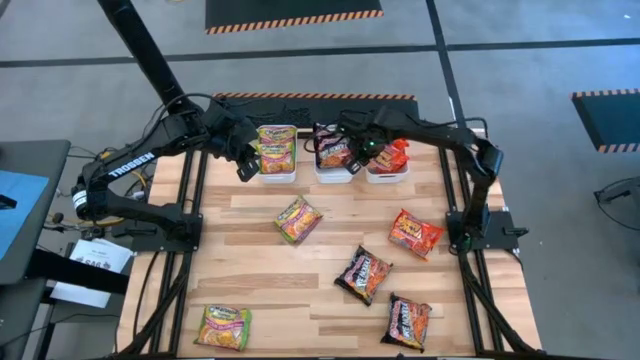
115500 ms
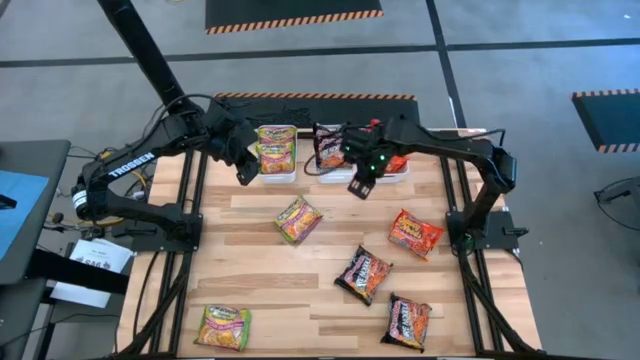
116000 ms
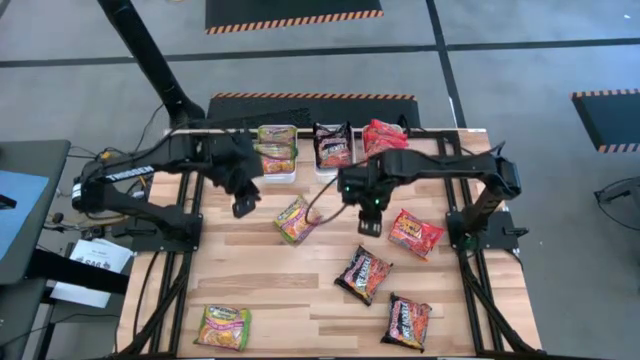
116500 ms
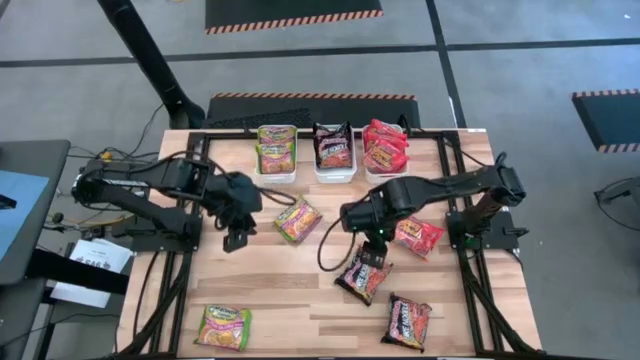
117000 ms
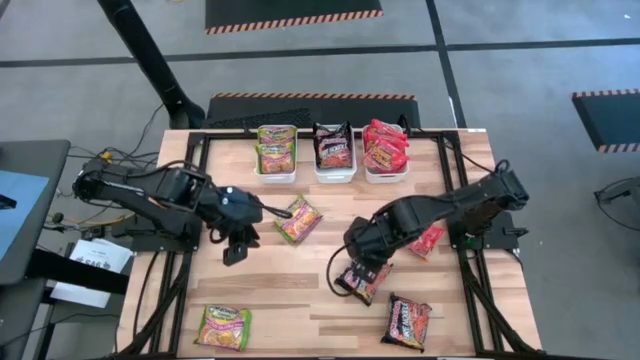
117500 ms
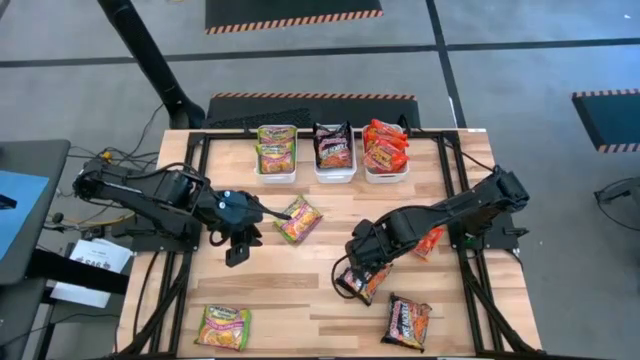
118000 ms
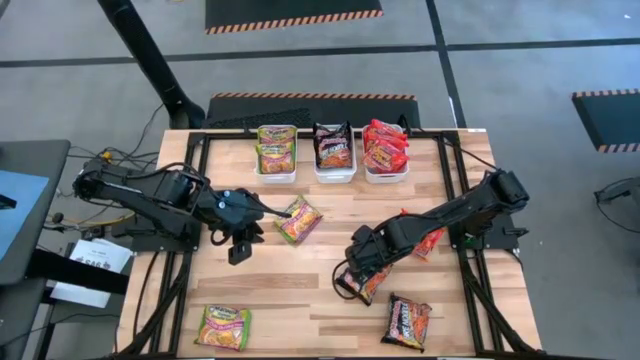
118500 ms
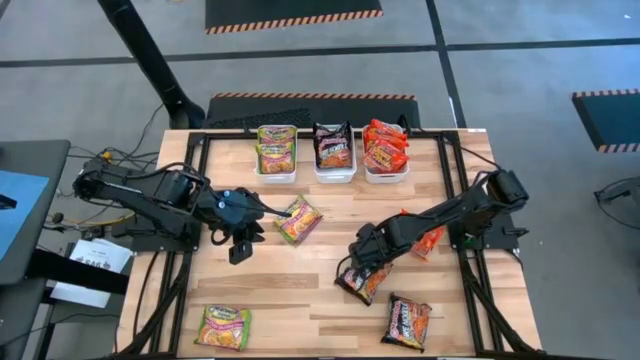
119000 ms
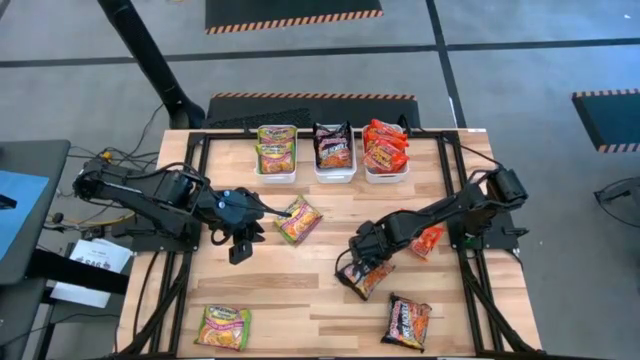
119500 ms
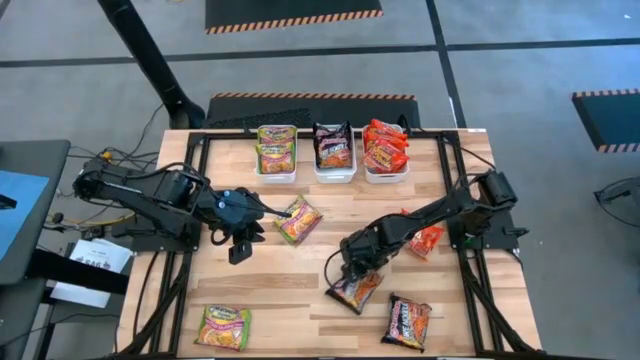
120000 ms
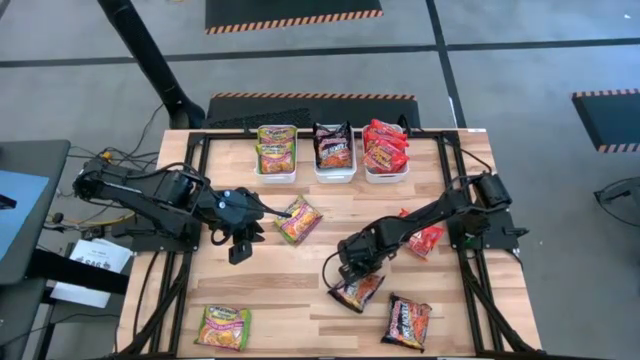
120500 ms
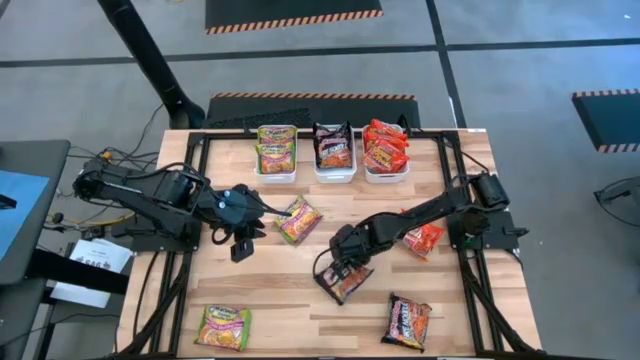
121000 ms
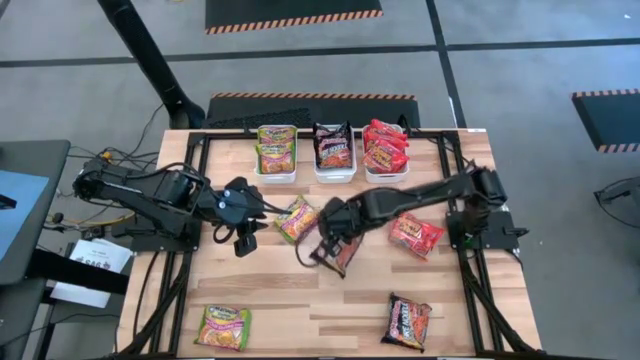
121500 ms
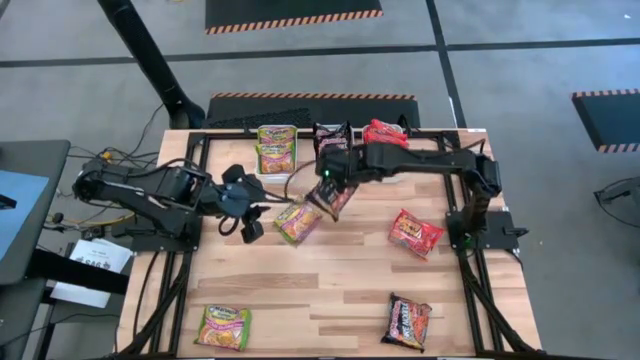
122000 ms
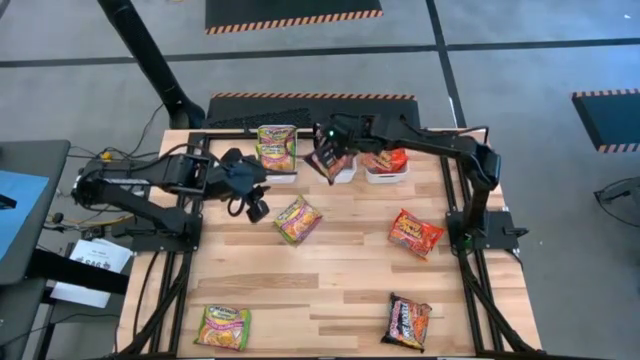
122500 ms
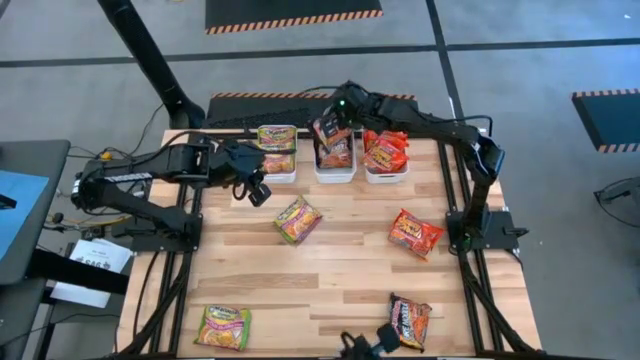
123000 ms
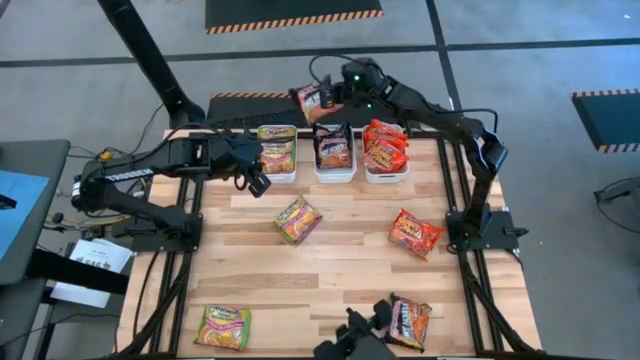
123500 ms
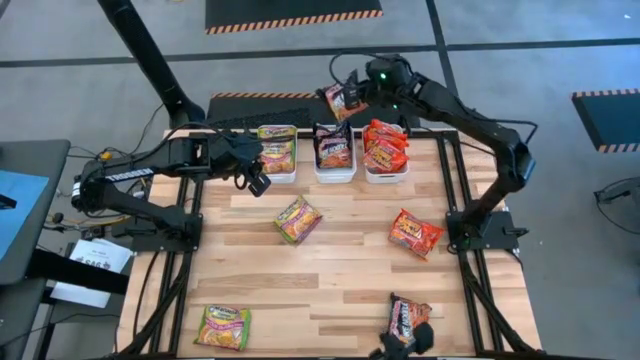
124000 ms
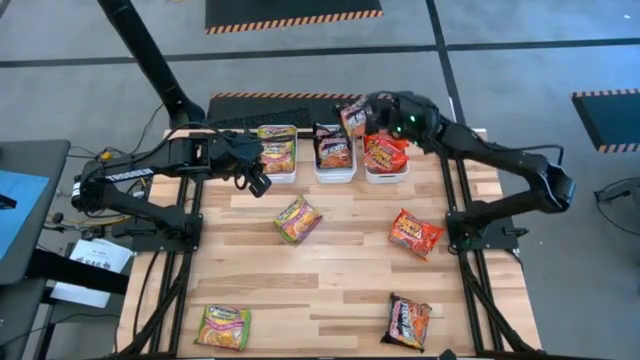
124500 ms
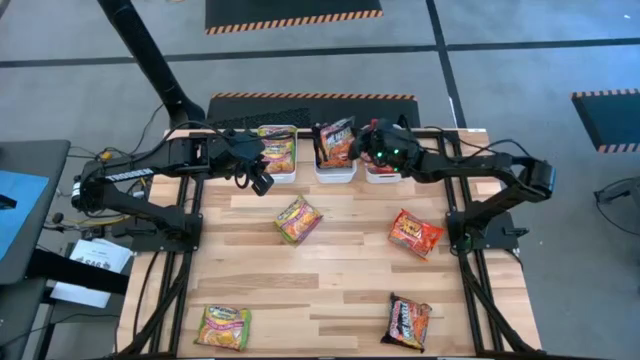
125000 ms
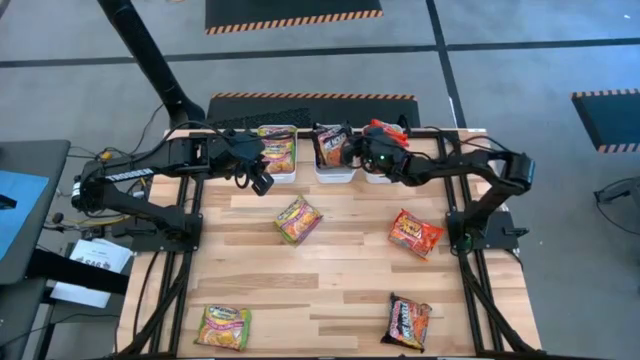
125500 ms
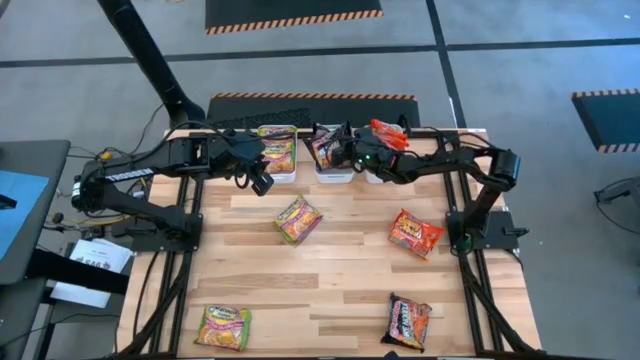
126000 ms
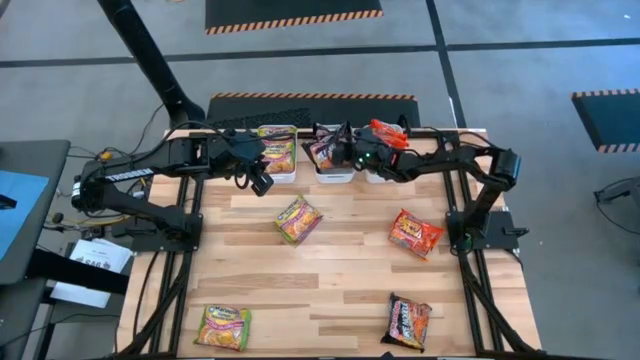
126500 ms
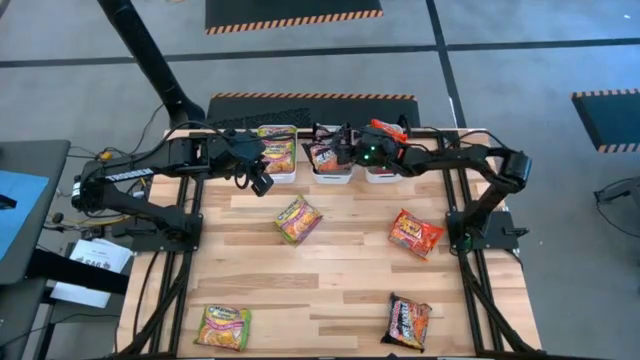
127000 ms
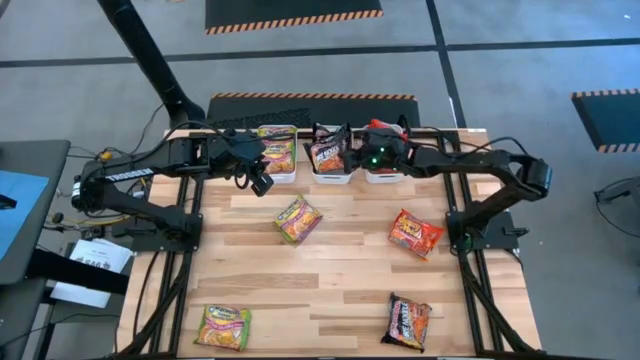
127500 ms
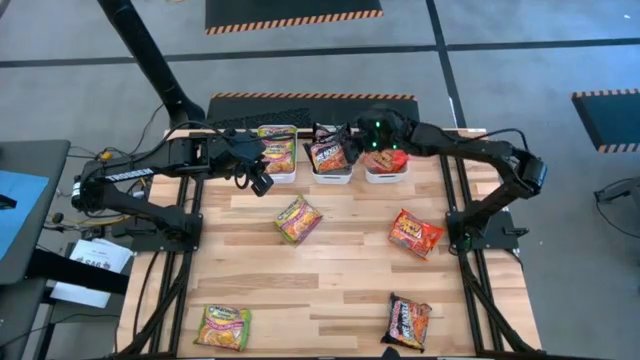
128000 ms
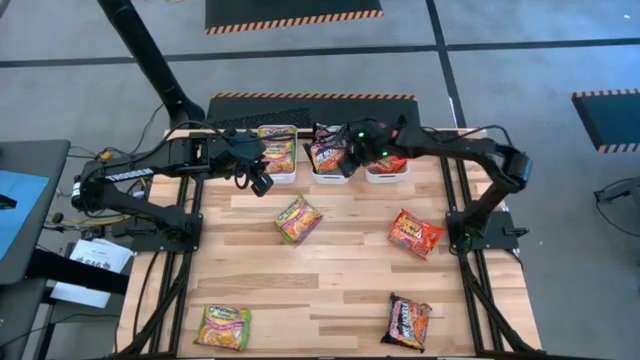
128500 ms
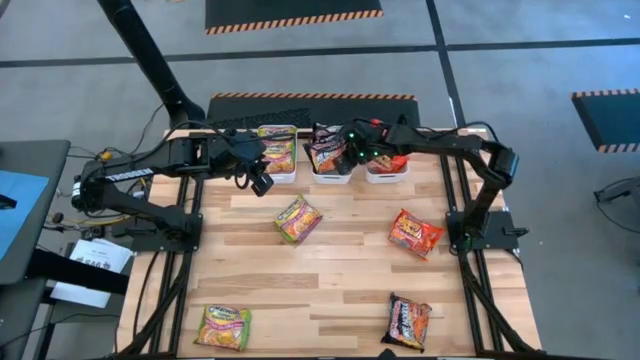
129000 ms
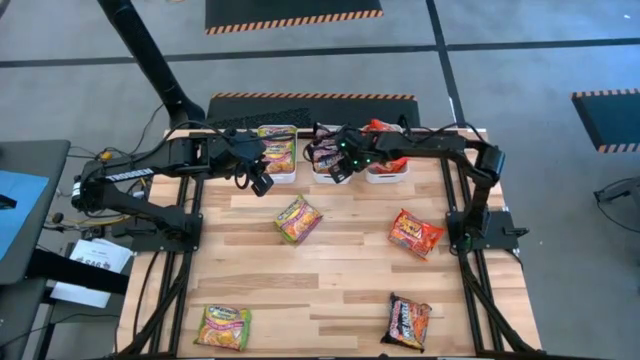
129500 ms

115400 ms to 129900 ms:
Task: Sort Maruchan noodles
Put the black noodle pack into the middle white bin

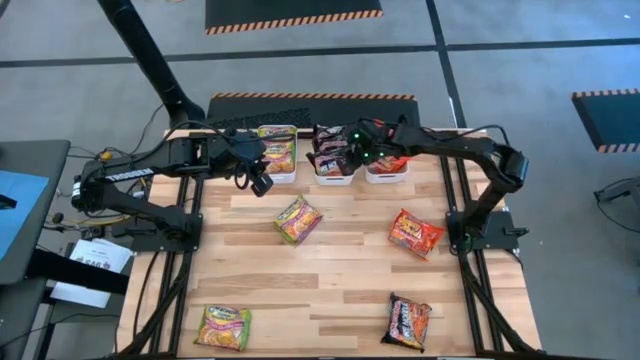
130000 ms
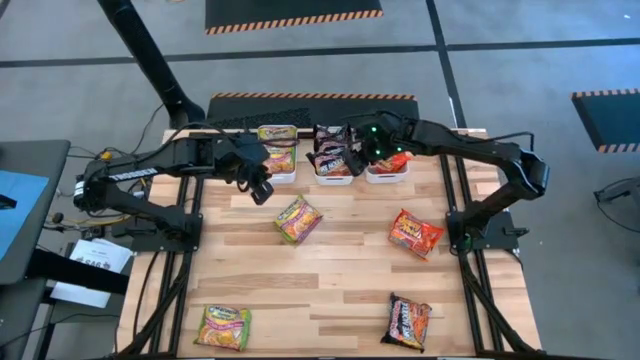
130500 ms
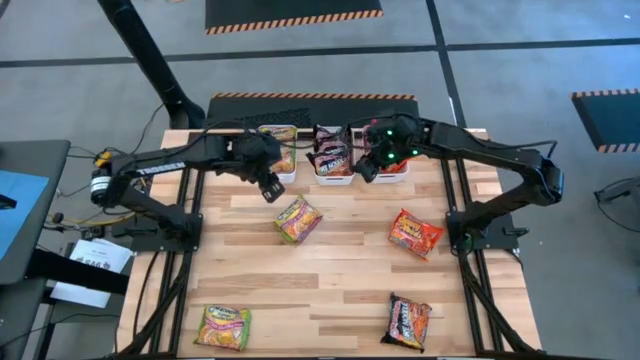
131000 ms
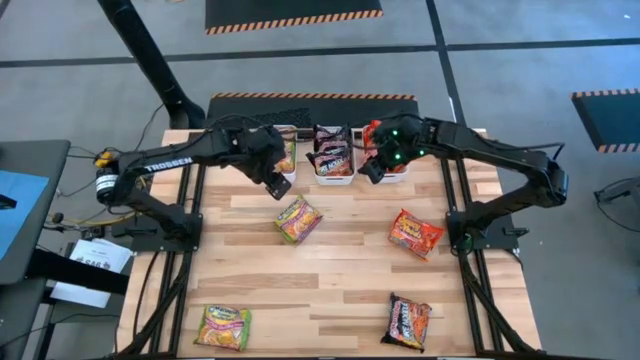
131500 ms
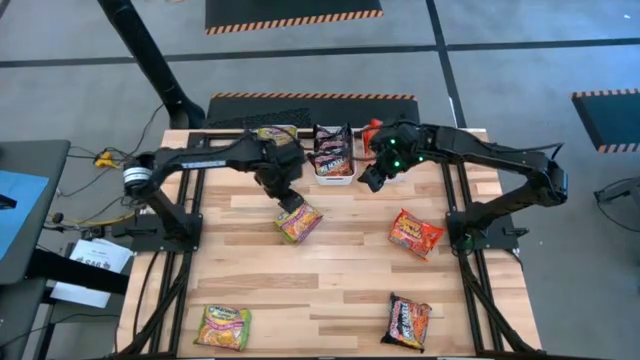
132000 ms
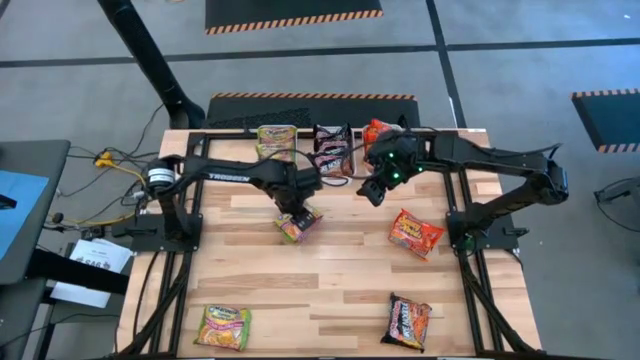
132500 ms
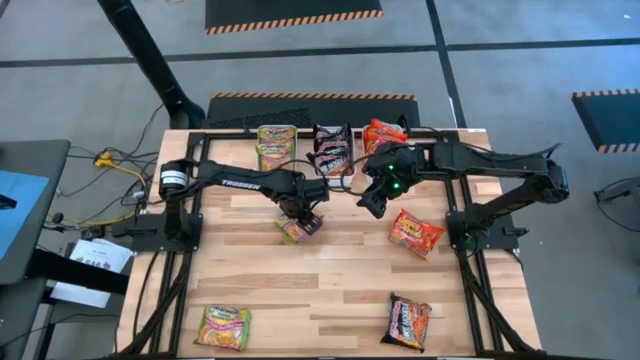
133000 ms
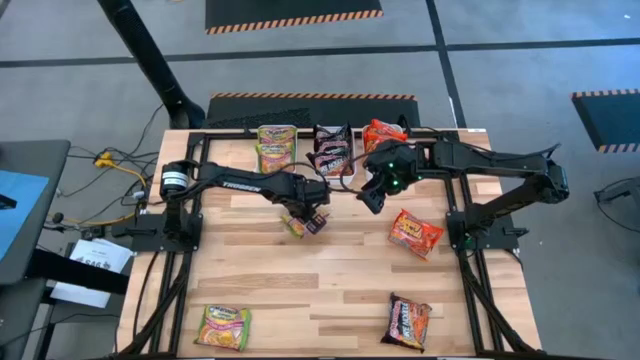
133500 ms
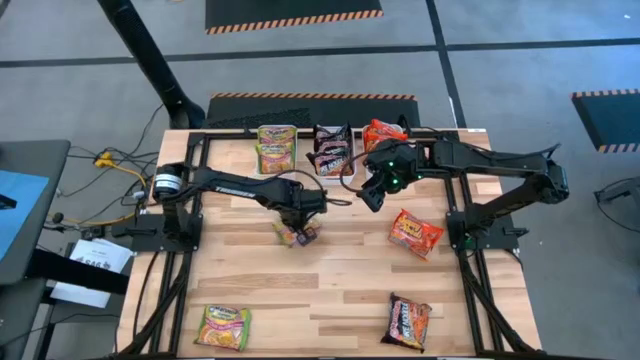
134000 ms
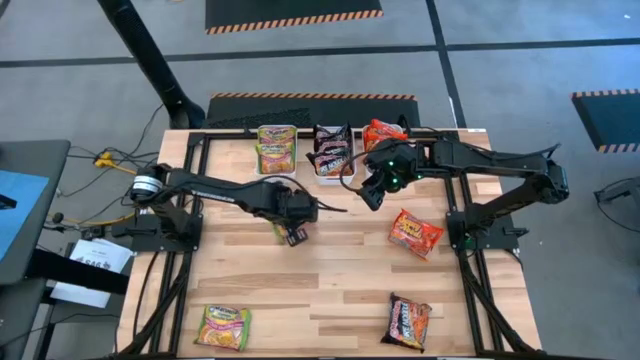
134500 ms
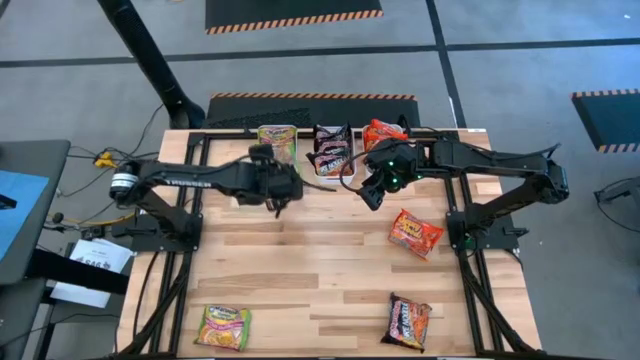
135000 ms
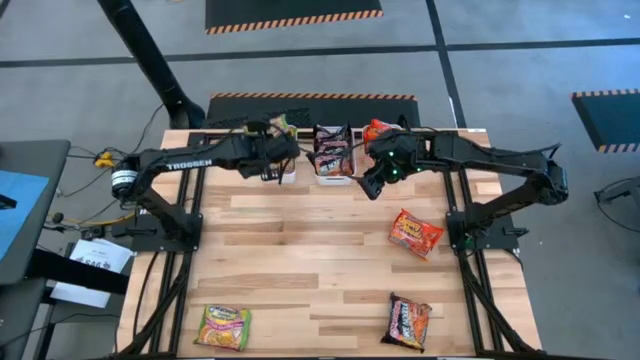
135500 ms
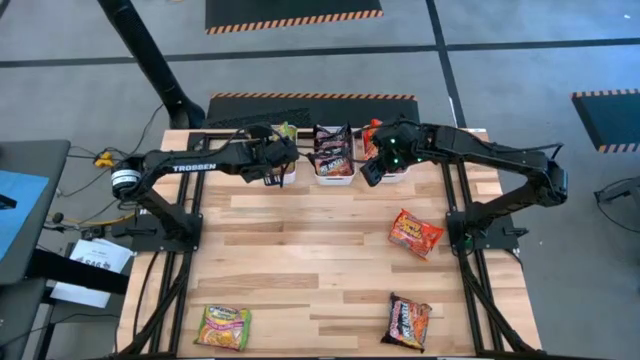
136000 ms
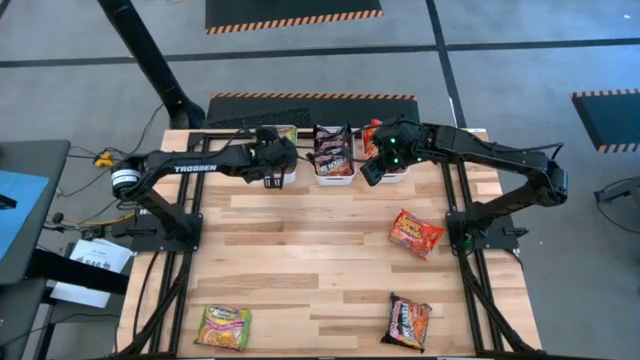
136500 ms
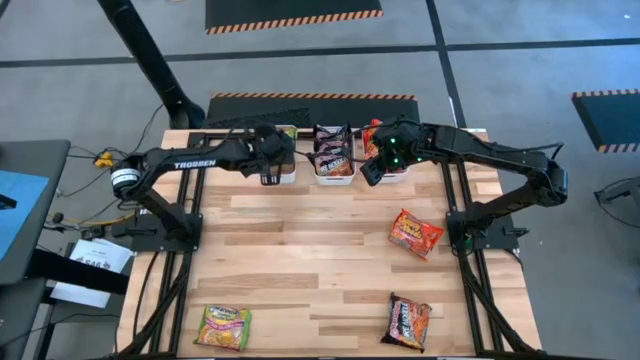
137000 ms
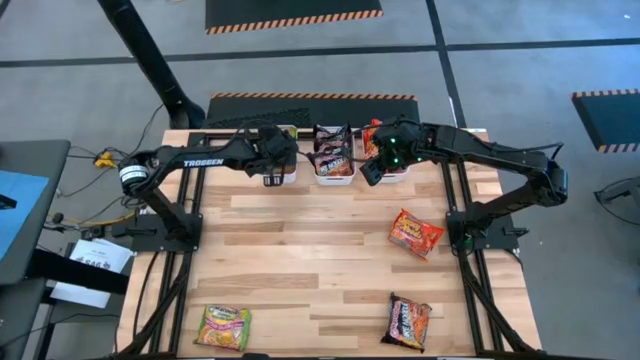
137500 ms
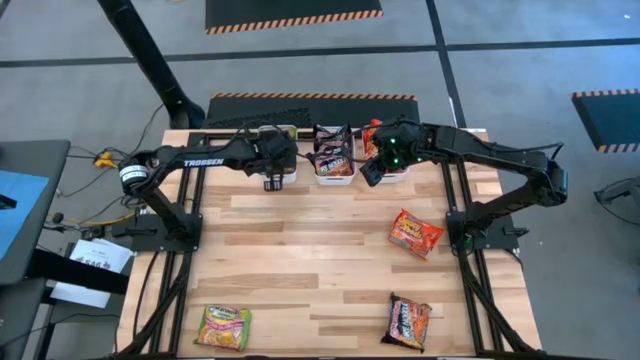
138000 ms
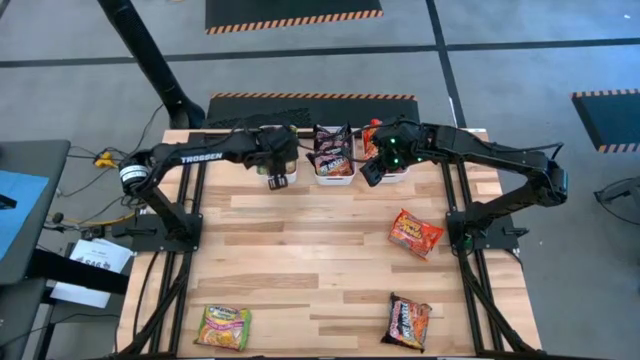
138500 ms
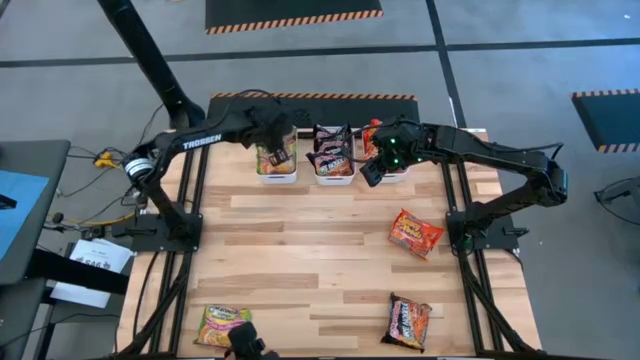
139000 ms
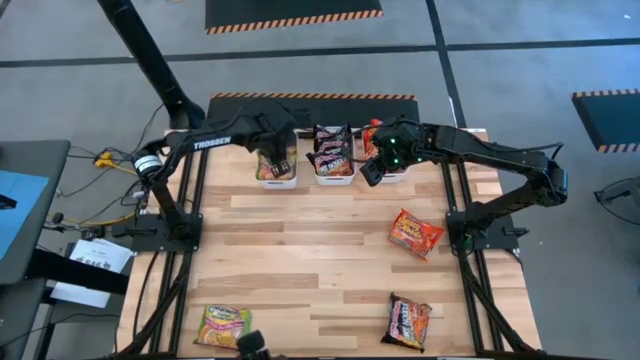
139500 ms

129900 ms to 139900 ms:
Put the green noodle pack into the left white bin
